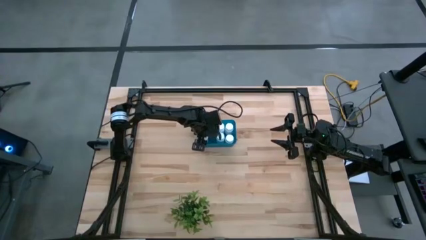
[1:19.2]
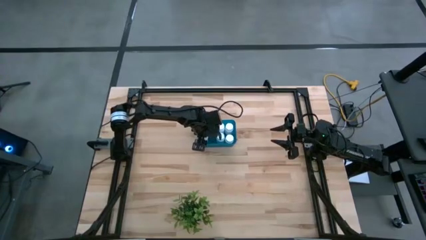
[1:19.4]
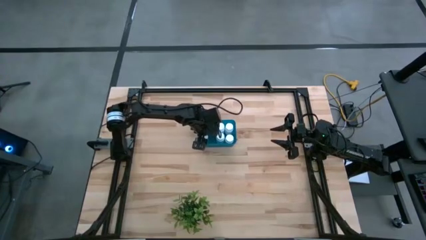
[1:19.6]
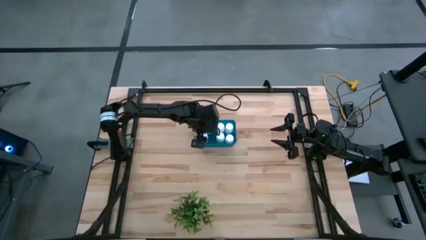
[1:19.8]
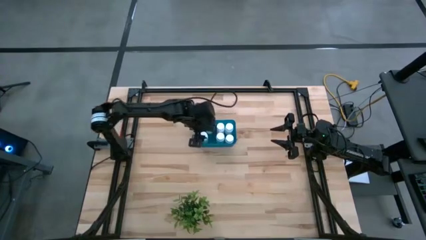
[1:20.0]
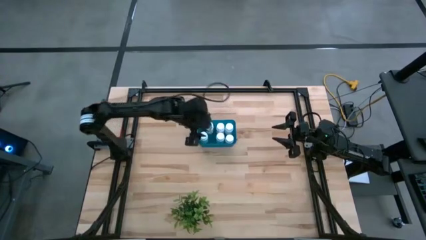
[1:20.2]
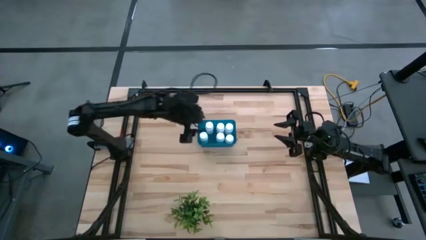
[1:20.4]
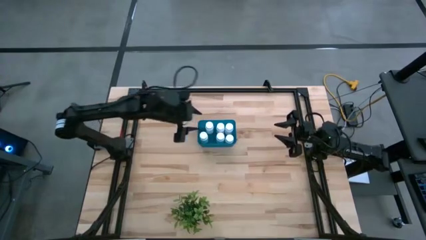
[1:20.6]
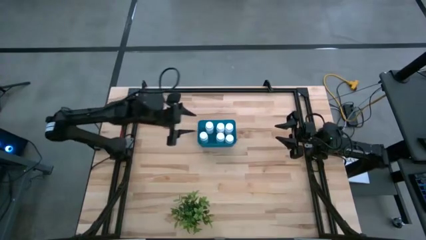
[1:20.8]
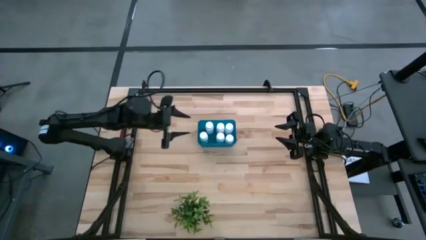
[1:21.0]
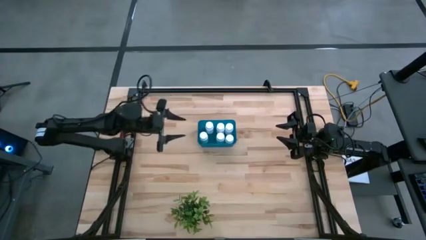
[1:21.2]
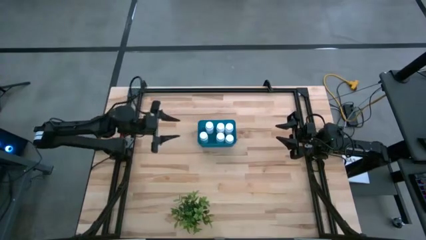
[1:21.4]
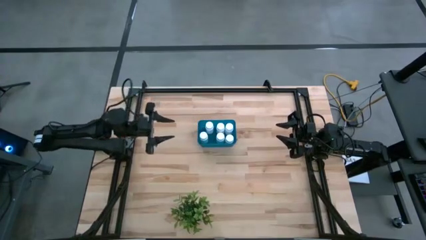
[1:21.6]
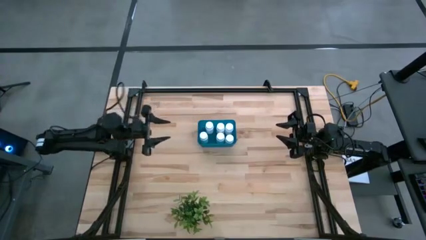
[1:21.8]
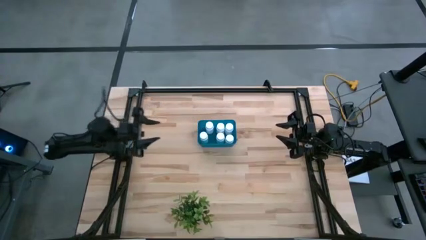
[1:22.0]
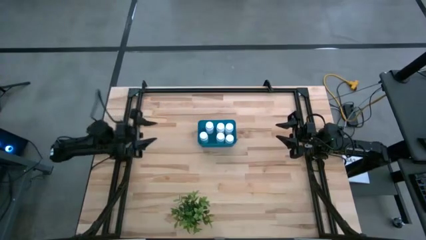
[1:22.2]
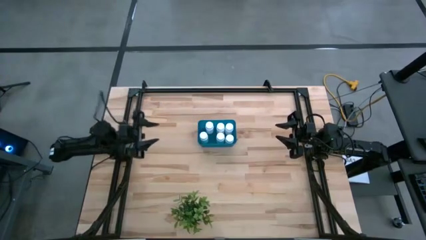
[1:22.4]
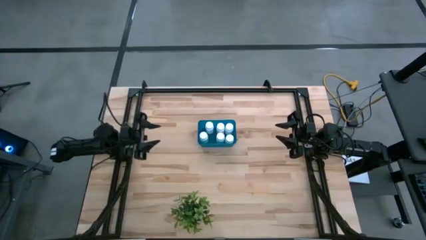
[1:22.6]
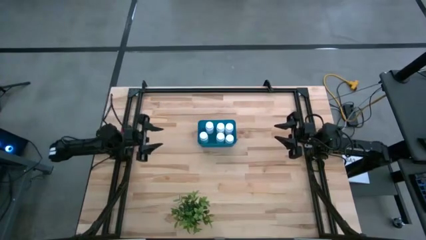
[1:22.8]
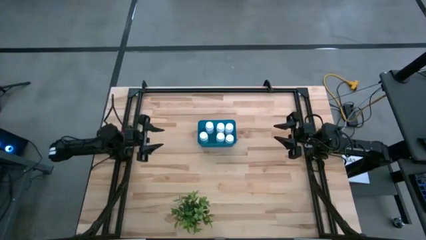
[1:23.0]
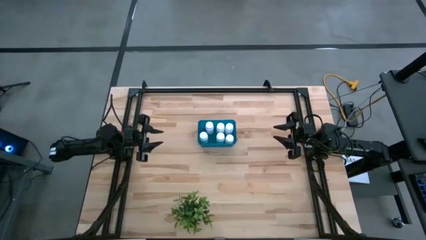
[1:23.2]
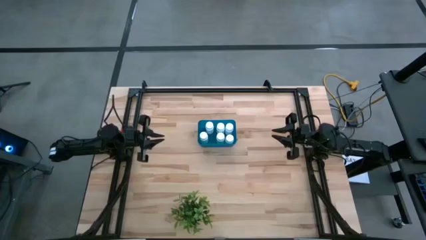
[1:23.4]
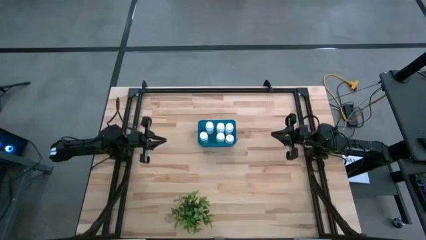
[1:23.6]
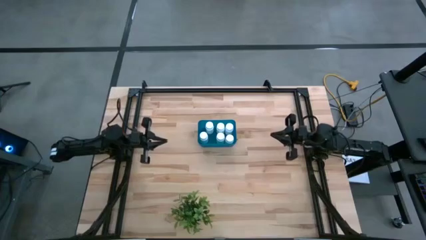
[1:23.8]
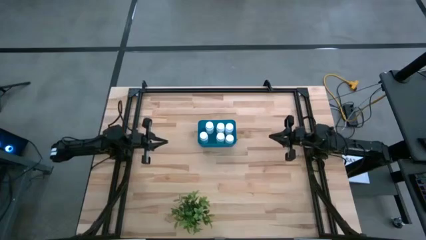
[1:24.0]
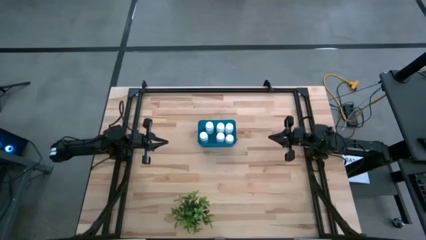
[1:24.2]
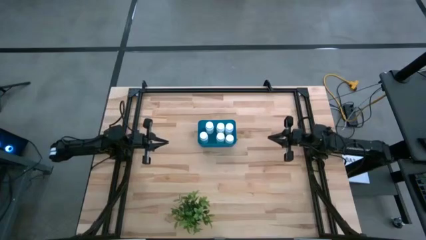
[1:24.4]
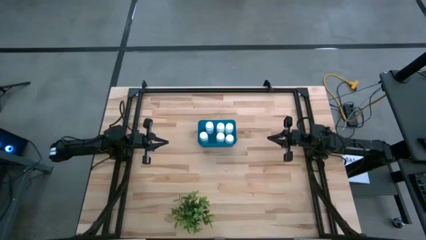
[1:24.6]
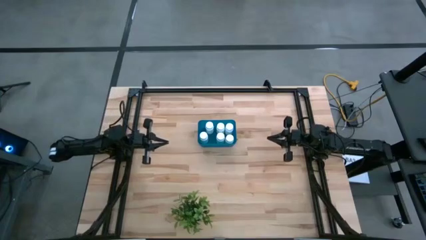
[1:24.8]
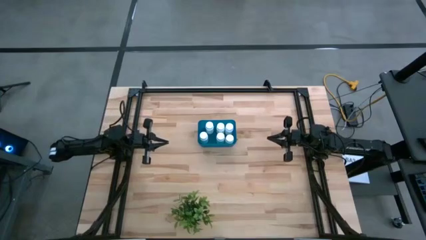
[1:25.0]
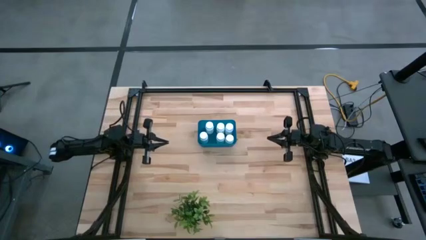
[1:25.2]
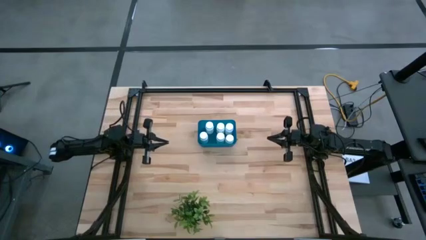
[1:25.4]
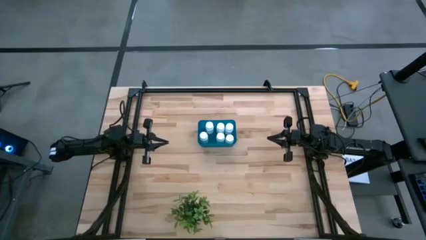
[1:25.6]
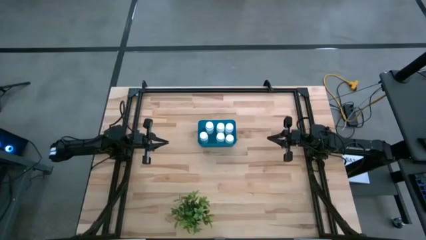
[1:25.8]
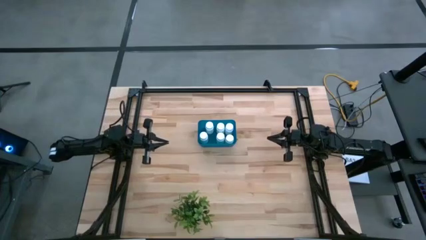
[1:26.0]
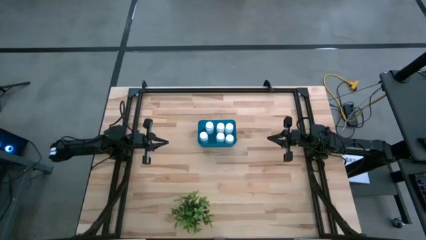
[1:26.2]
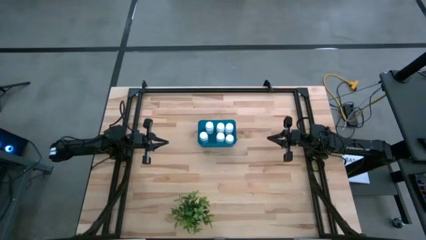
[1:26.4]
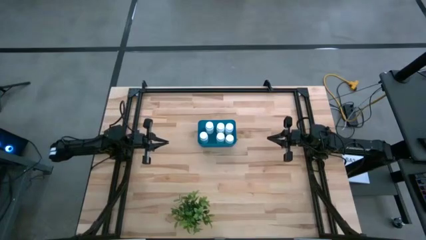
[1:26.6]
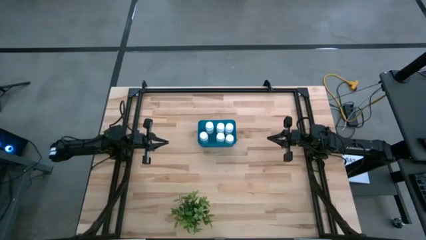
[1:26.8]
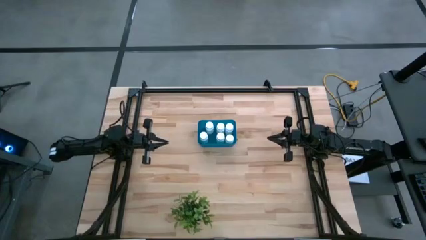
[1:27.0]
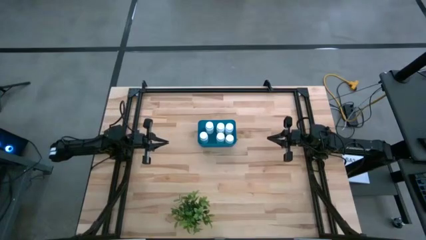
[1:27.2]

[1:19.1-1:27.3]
Task: Pick and place pill bottles into a basket
Return to Home Position

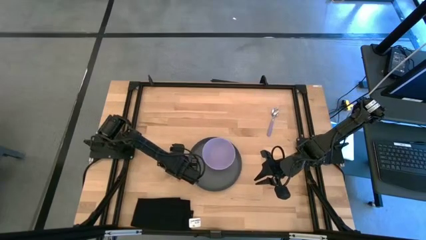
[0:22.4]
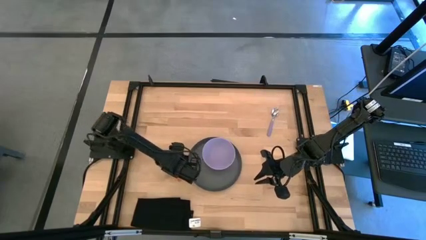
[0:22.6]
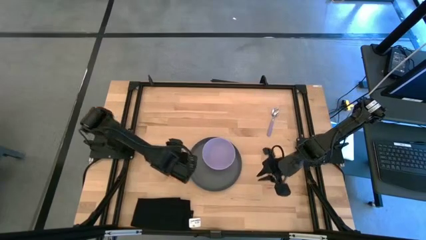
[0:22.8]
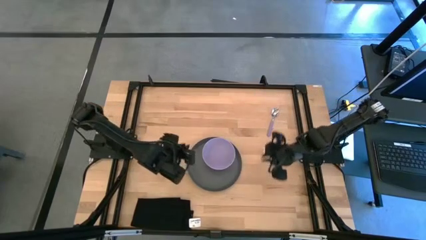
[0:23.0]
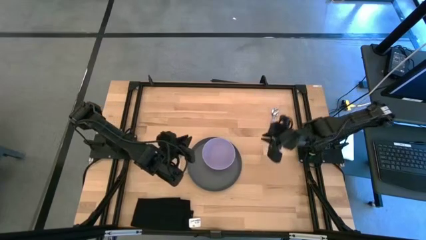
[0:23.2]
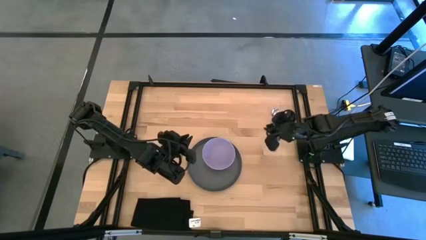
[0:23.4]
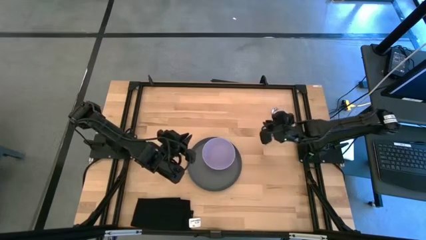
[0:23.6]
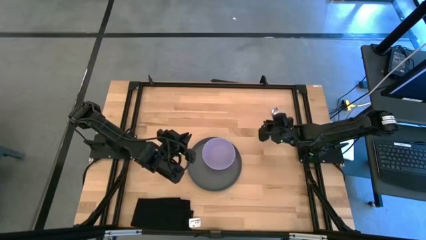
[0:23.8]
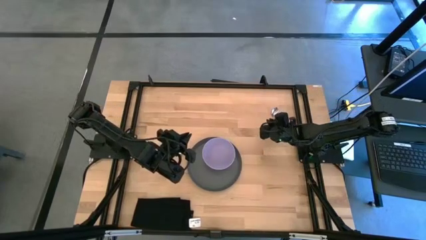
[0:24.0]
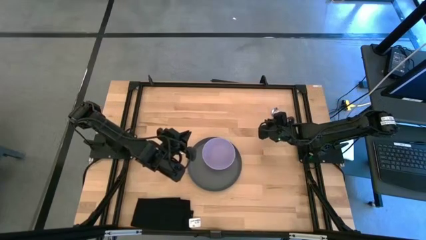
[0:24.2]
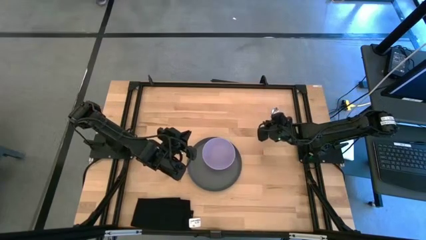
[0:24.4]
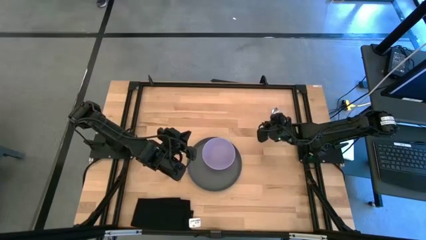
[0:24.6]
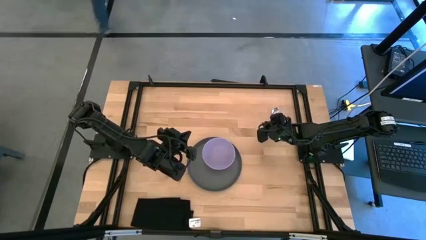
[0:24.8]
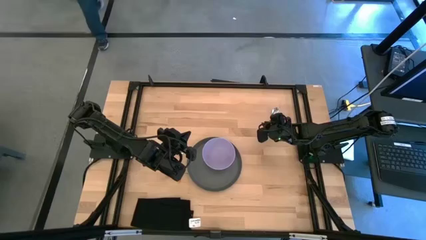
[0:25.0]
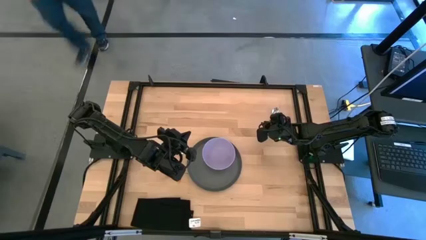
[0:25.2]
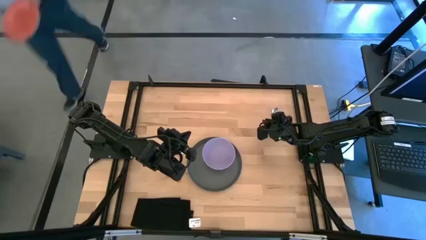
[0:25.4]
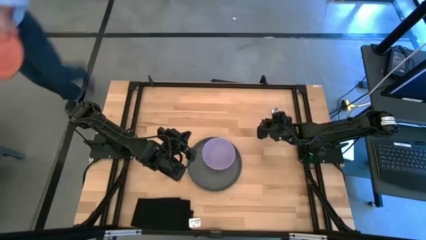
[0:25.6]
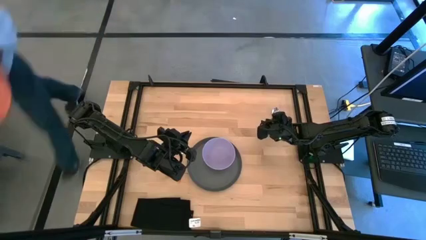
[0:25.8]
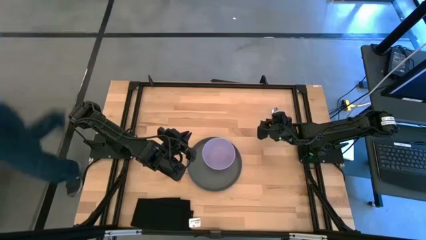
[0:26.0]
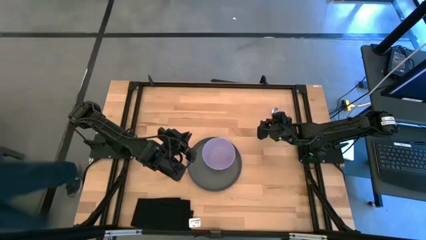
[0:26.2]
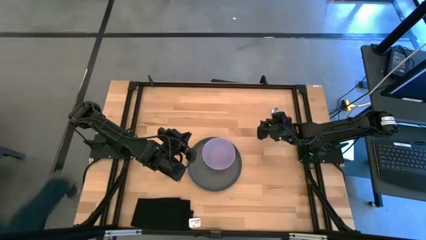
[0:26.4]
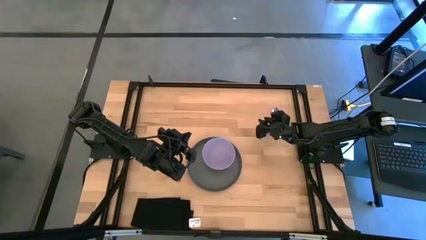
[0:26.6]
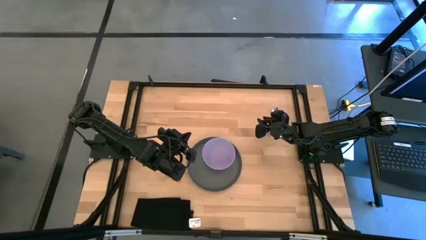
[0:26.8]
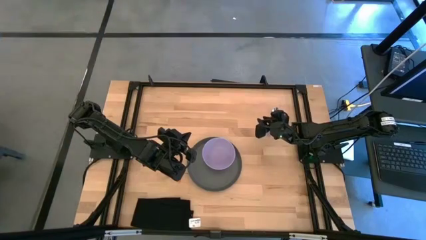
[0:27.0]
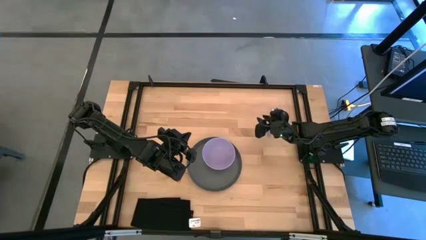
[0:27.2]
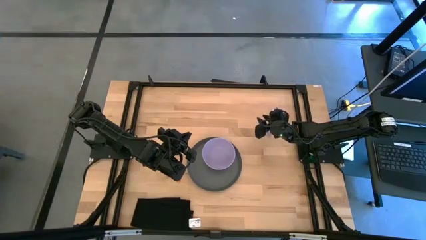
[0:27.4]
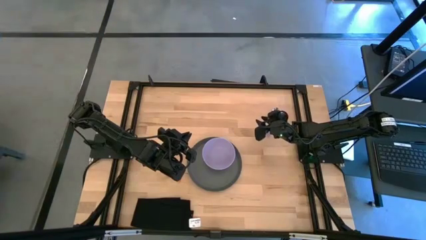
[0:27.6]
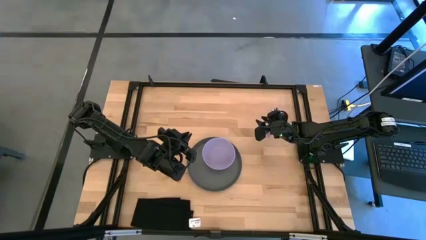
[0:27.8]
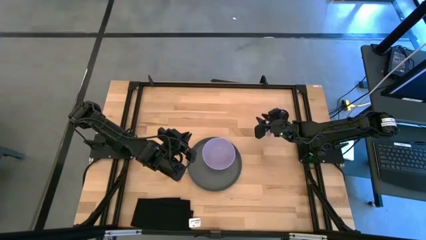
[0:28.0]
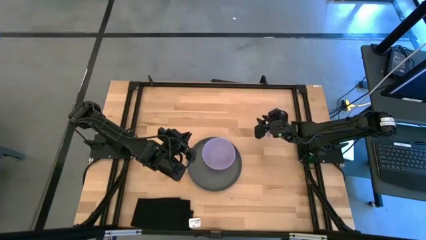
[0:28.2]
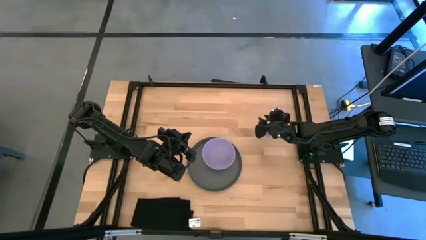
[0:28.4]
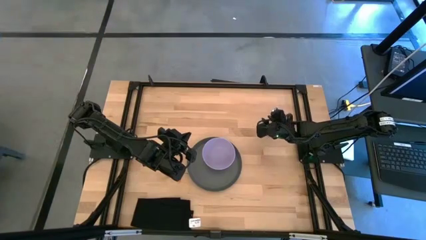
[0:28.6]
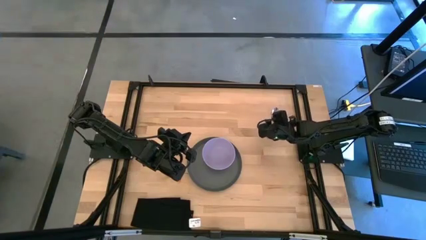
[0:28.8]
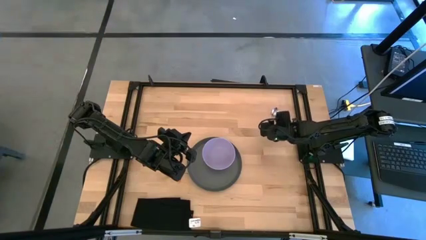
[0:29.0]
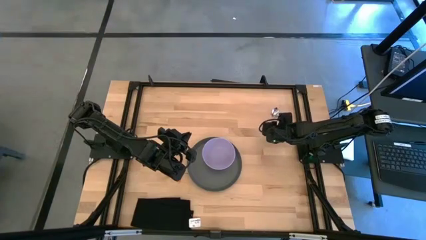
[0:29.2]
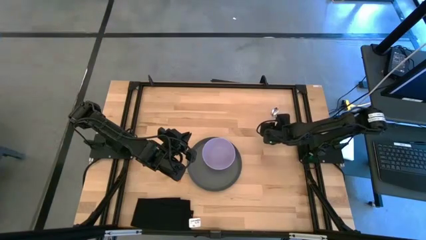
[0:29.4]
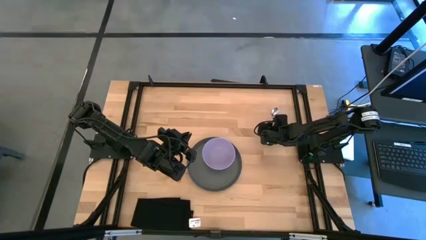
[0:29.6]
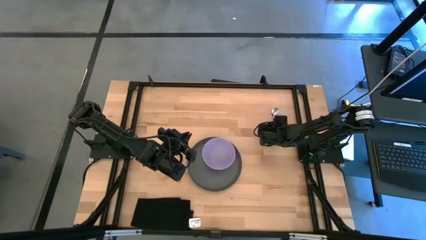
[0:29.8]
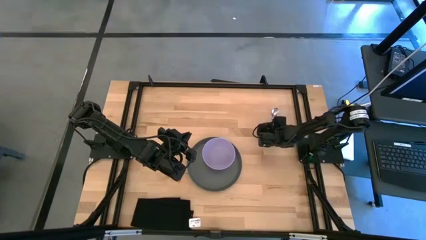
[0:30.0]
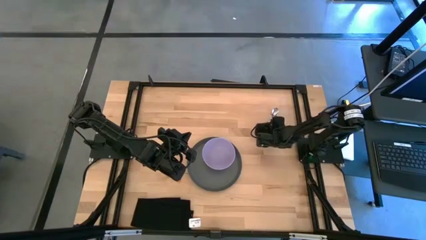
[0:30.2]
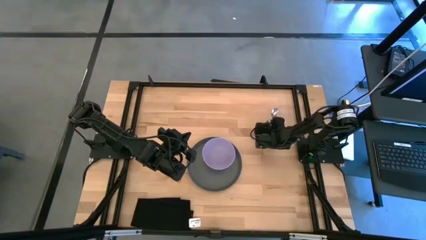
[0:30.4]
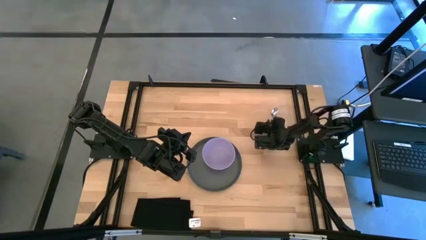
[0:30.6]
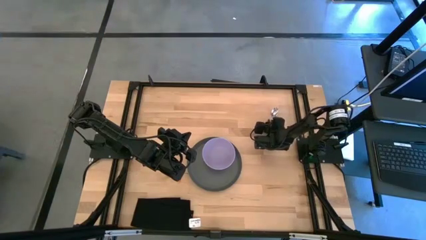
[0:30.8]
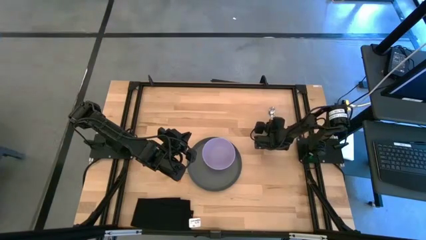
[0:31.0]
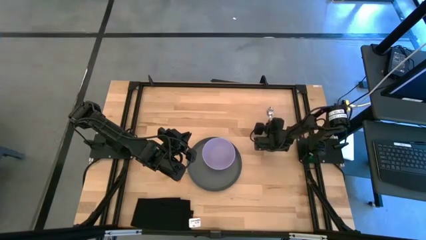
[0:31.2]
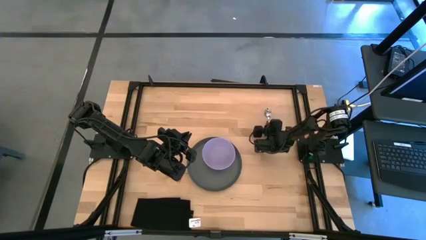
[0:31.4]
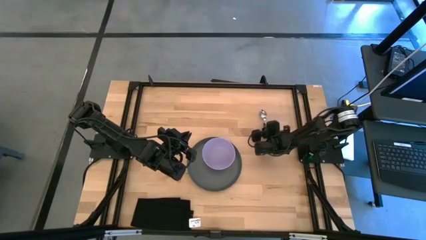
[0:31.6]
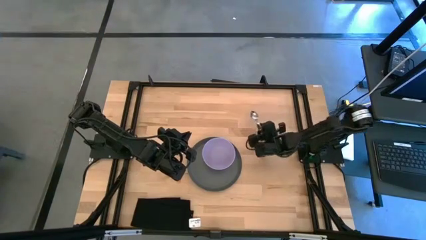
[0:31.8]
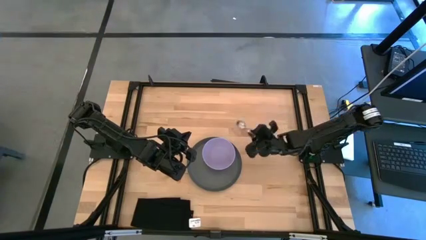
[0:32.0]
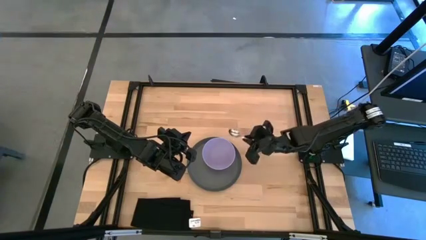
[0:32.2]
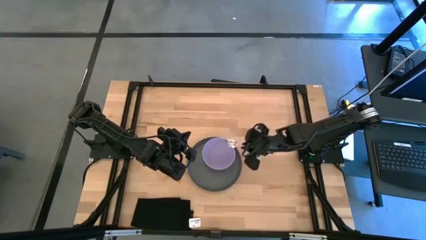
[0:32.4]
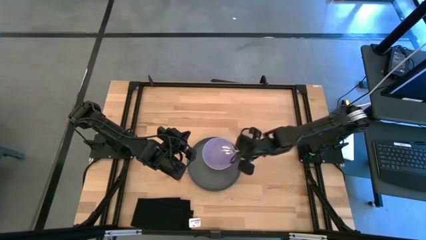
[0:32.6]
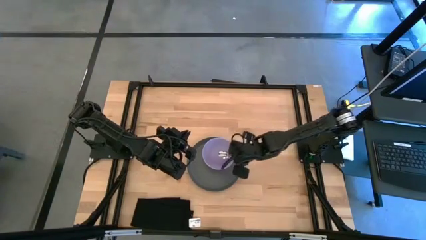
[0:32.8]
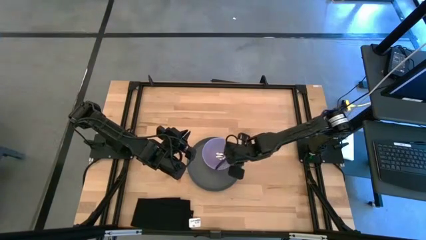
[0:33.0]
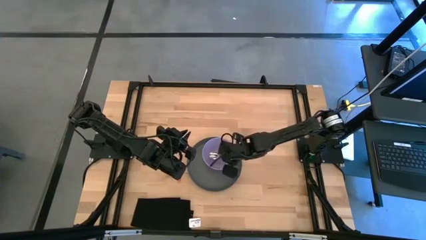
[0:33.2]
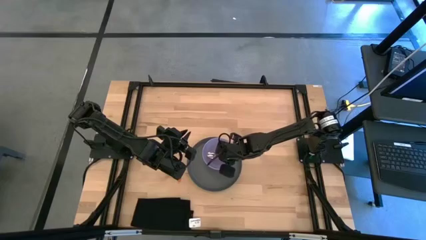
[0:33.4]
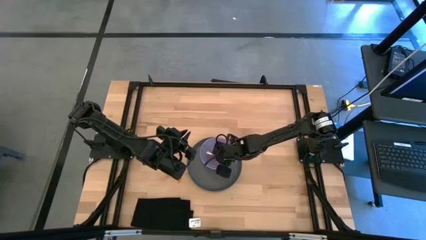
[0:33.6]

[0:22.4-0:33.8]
Task: Set table place
Put the purple spoon on the purple bowl
